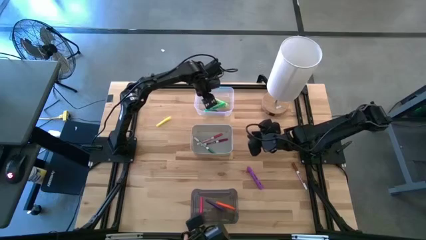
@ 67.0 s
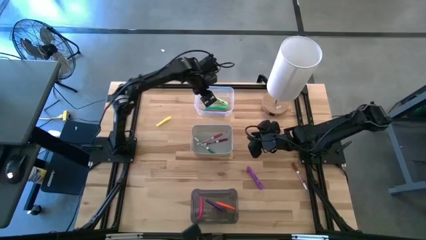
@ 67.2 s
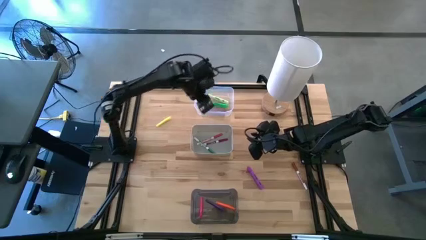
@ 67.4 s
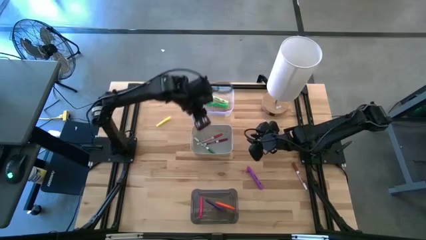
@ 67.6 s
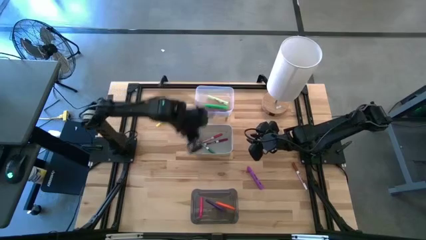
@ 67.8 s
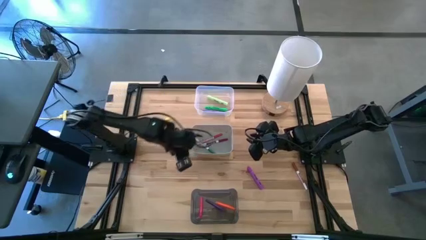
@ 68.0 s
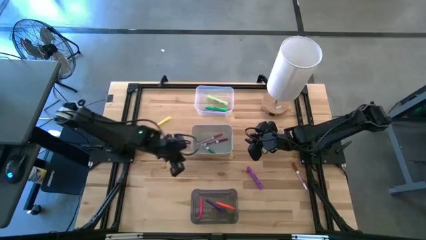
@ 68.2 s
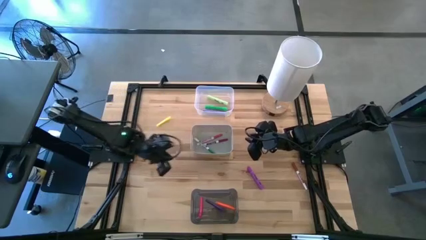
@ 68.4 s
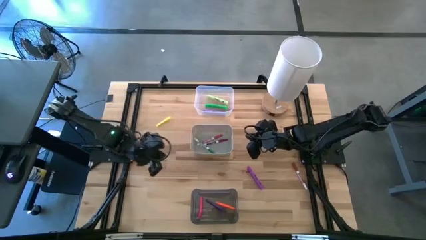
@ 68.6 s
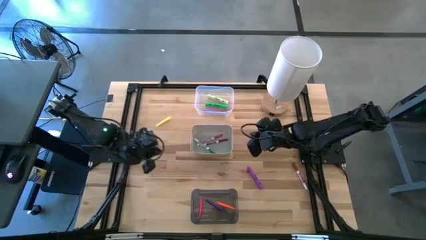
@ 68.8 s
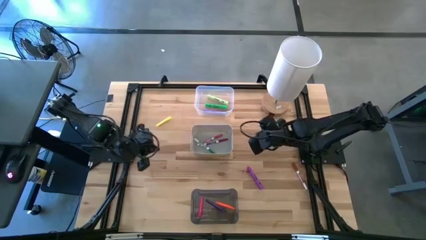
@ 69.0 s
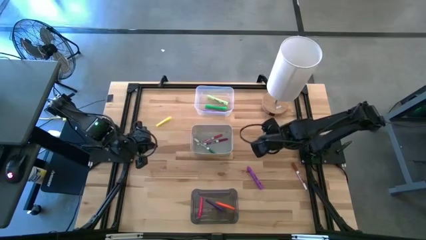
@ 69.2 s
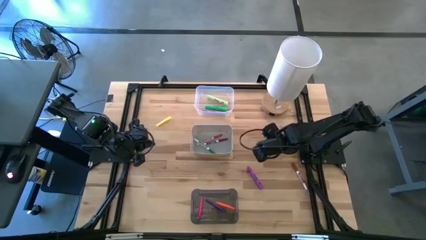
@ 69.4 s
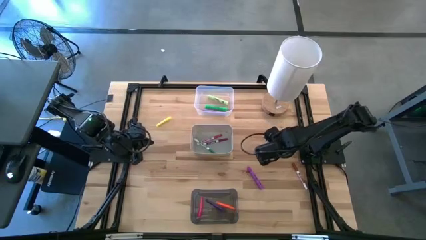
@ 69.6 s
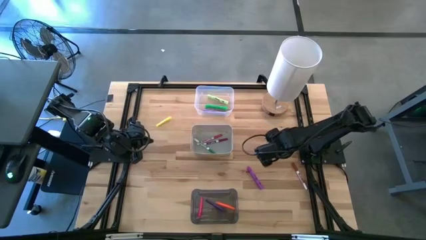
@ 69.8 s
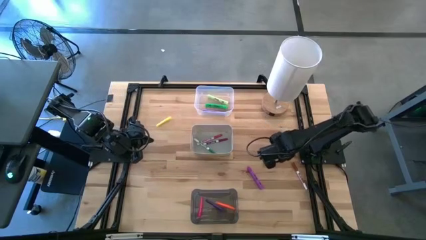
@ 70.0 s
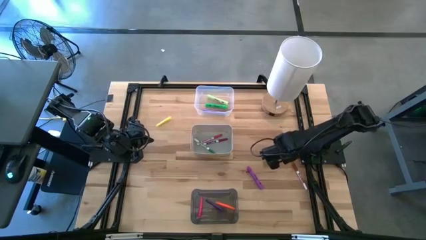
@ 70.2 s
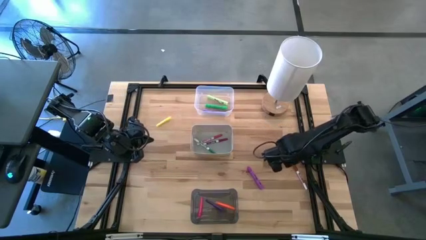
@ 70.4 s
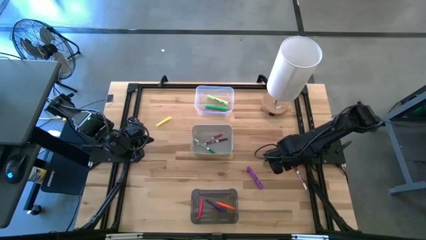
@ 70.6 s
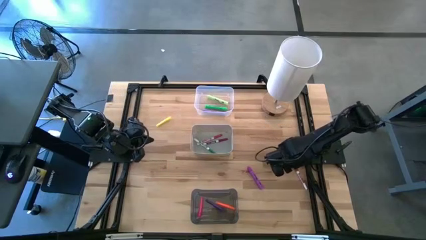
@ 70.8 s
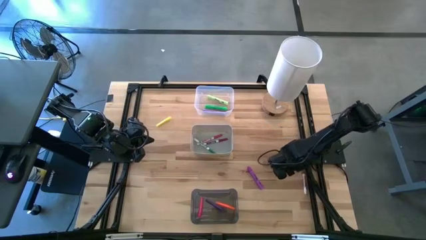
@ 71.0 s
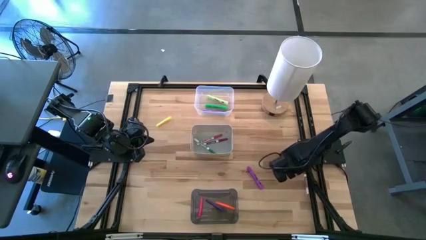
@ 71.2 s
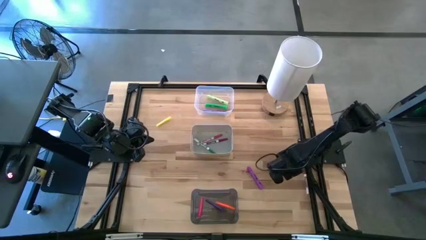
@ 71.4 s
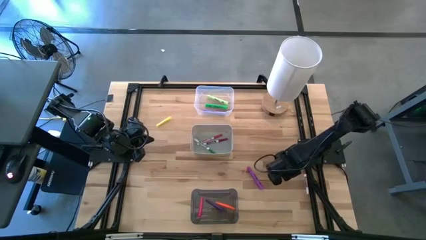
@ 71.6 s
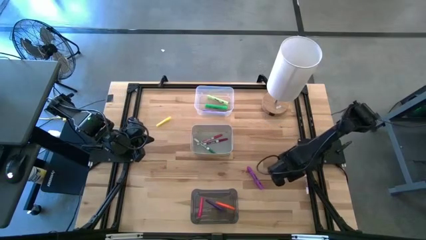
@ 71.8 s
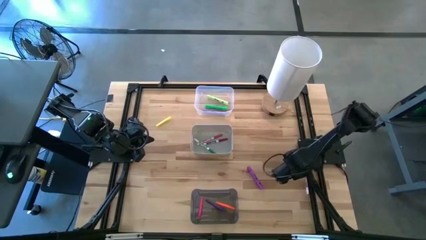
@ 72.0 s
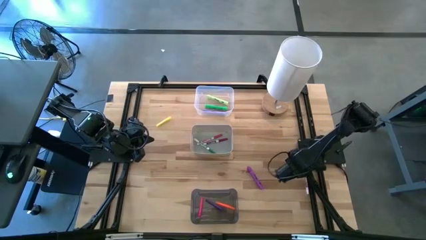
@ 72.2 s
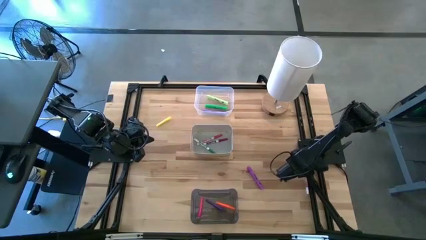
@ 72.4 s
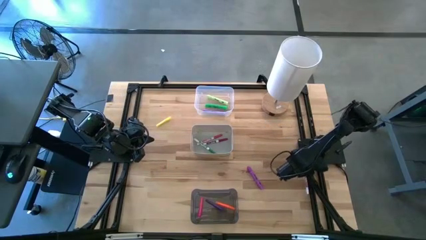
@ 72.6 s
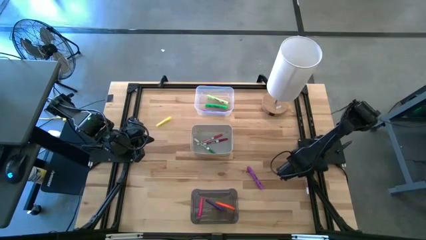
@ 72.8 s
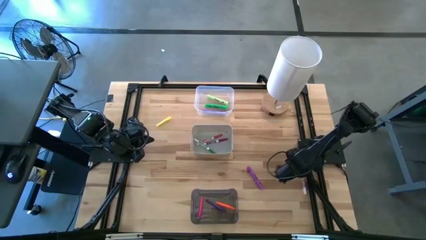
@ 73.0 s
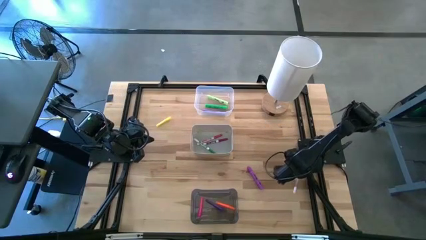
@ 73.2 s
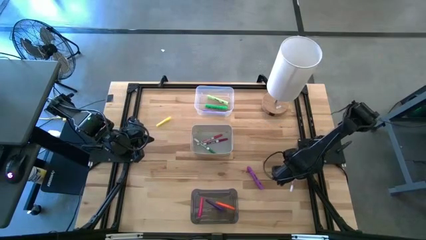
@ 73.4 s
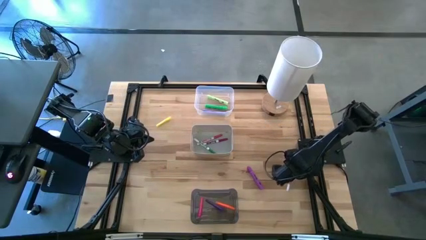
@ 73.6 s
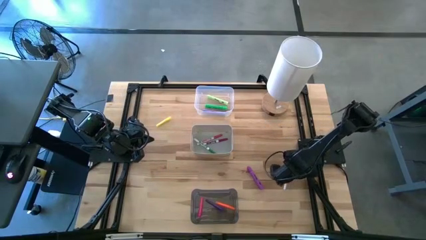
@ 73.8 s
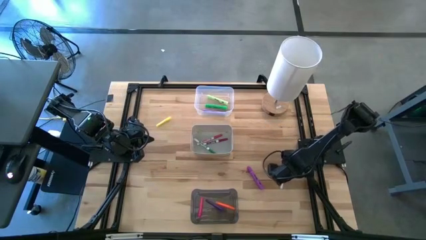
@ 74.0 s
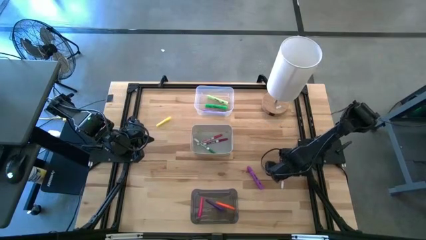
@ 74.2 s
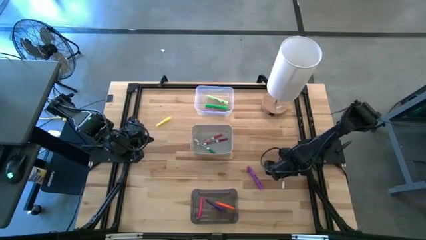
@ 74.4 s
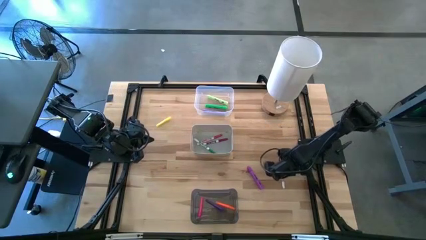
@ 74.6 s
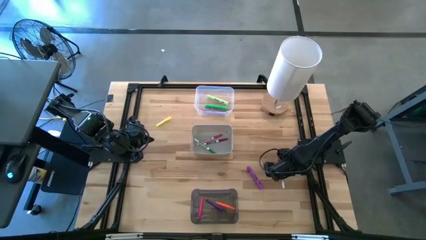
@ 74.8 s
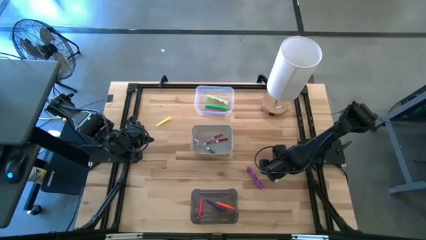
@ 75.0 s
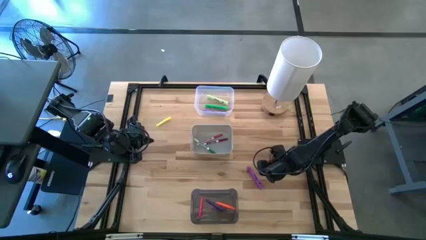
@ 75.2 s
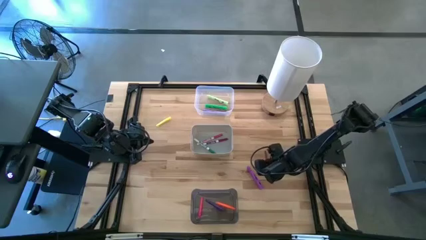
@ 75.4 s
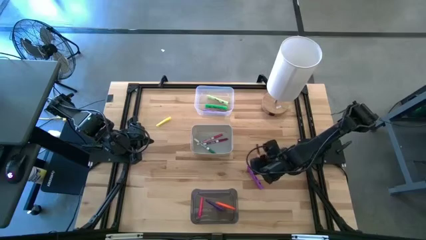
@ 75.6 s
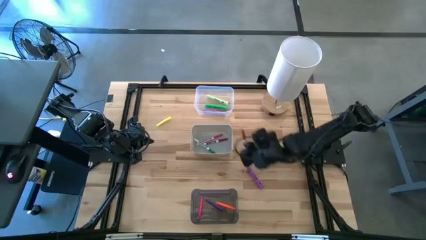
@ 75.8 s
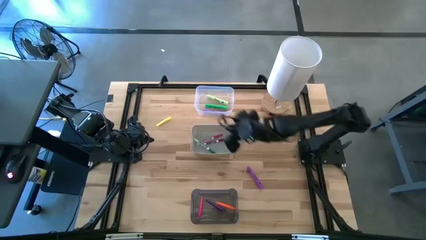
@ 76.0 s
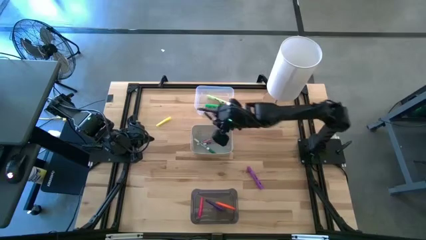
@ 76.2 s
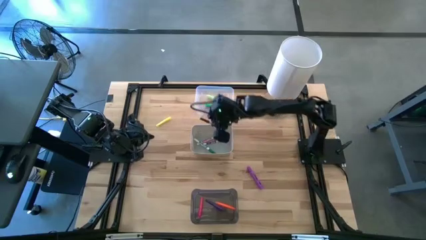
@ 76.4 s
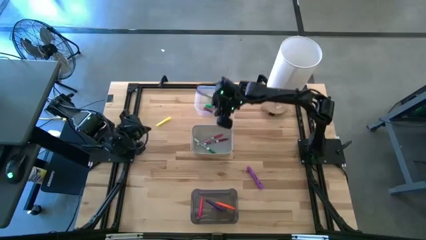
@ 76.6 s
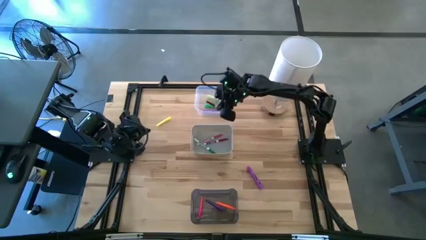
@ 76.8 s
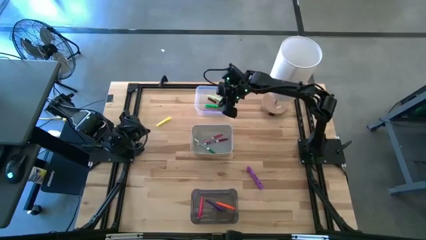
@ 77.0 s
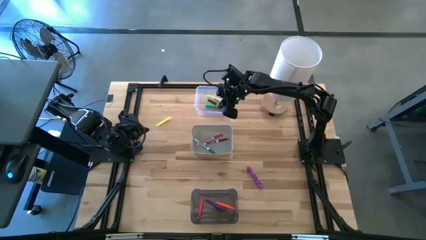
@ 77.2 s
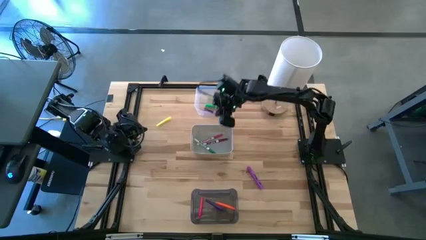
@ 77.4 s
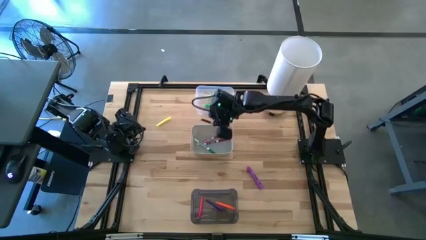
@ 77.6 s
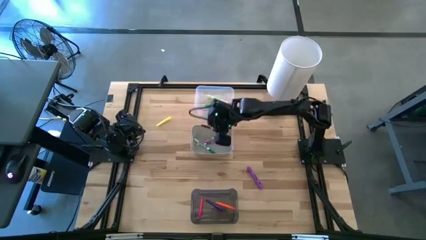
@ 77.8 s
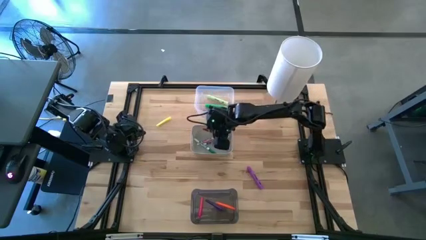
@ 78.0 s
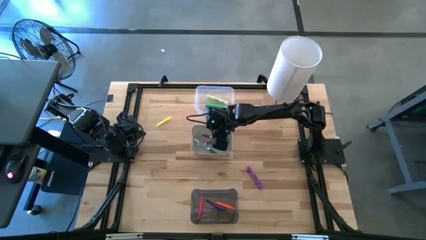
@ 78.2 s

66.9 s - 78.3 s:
Task: Pick & Place Markers
Put the brown marker into the gray bin

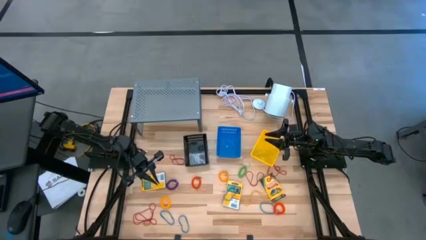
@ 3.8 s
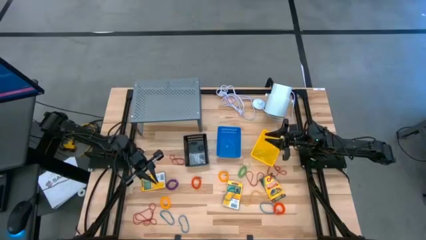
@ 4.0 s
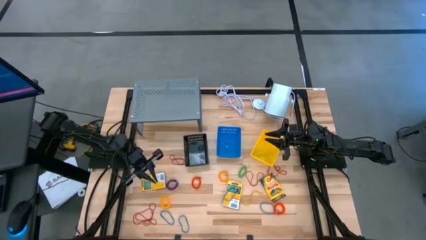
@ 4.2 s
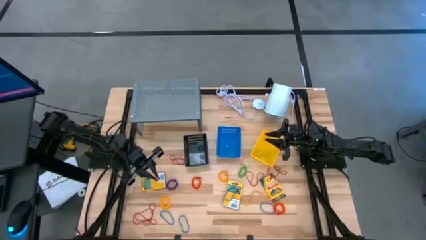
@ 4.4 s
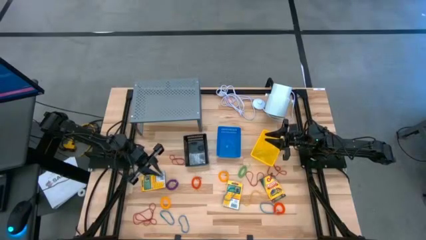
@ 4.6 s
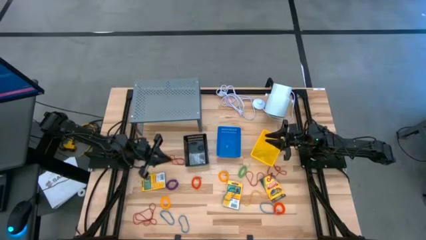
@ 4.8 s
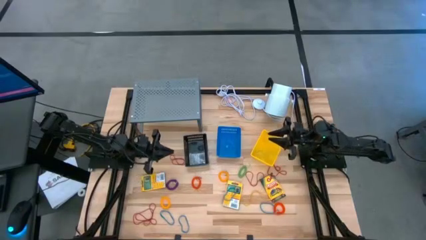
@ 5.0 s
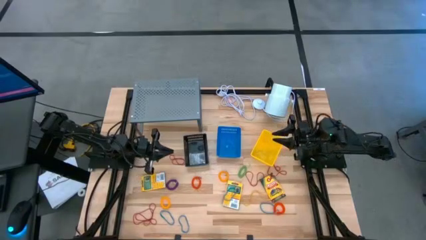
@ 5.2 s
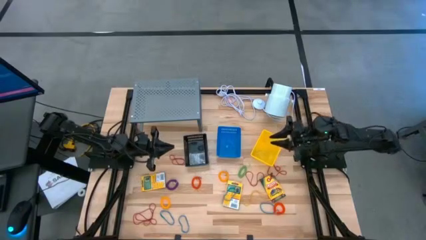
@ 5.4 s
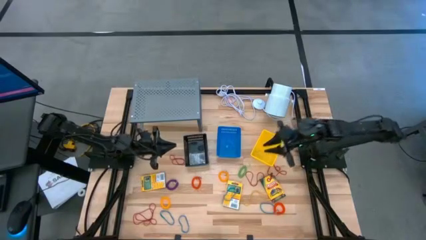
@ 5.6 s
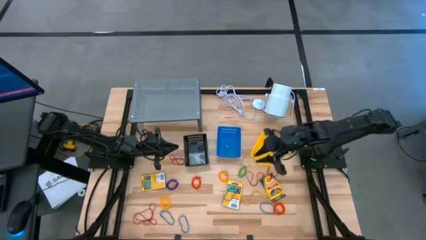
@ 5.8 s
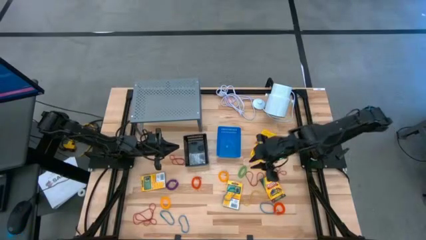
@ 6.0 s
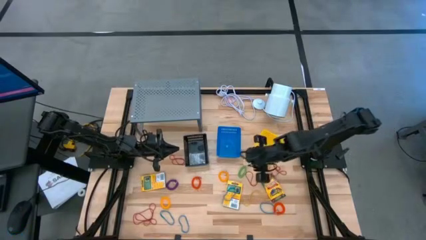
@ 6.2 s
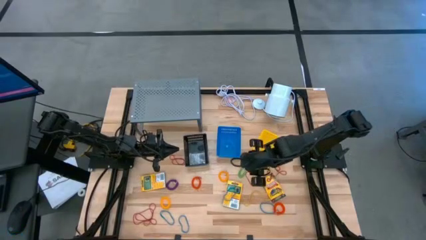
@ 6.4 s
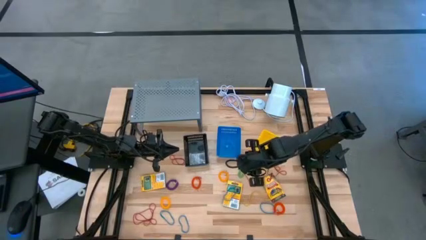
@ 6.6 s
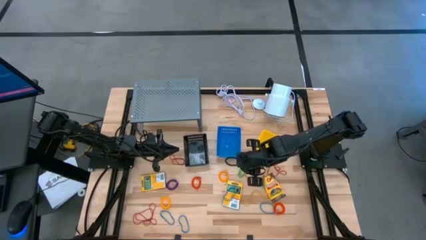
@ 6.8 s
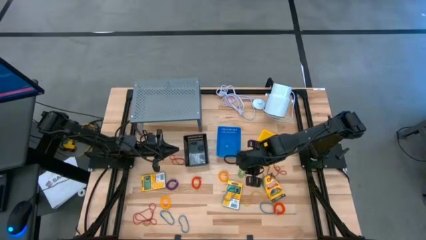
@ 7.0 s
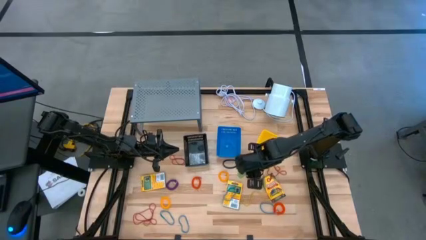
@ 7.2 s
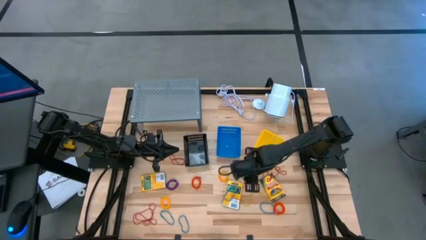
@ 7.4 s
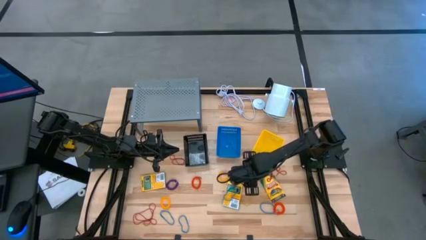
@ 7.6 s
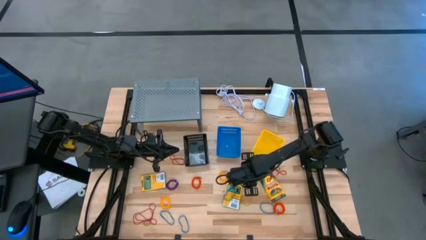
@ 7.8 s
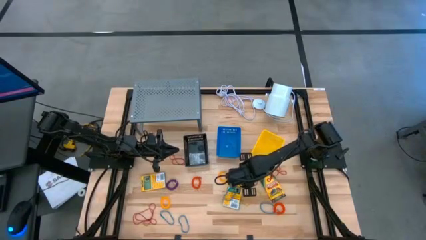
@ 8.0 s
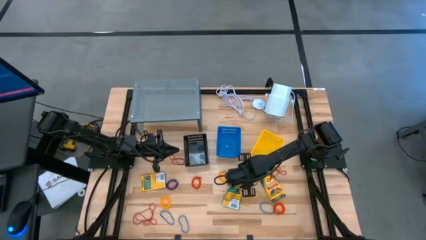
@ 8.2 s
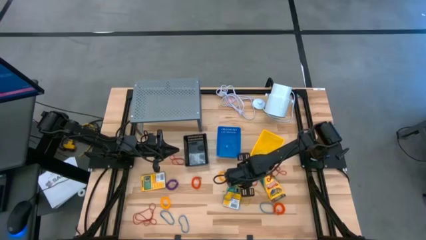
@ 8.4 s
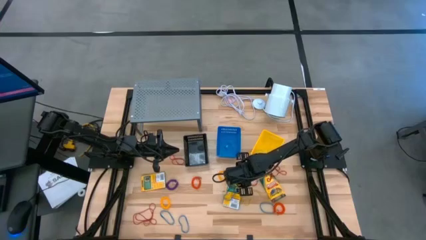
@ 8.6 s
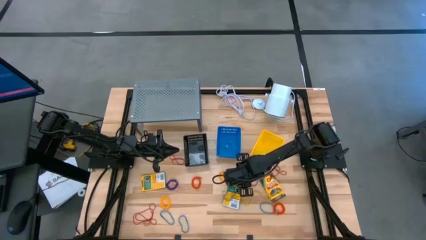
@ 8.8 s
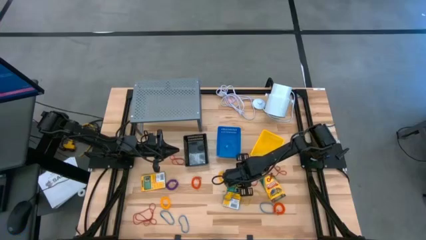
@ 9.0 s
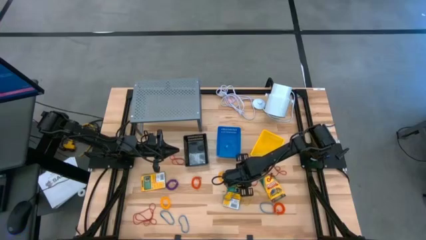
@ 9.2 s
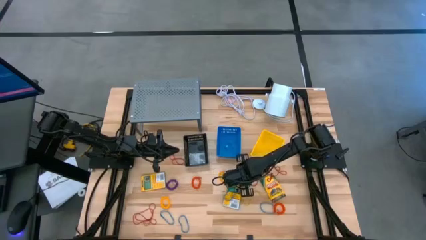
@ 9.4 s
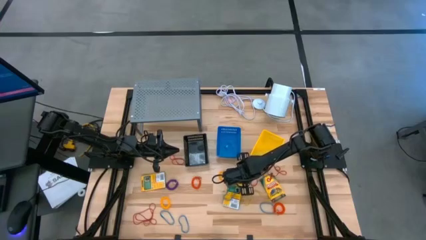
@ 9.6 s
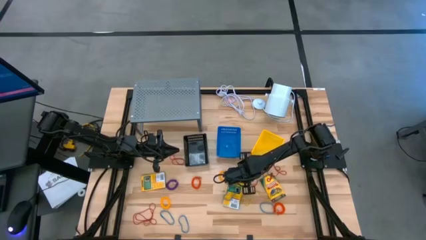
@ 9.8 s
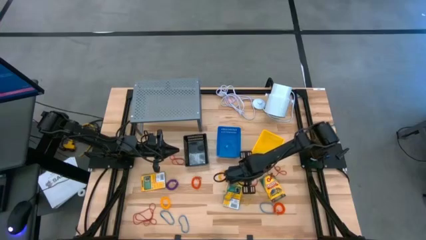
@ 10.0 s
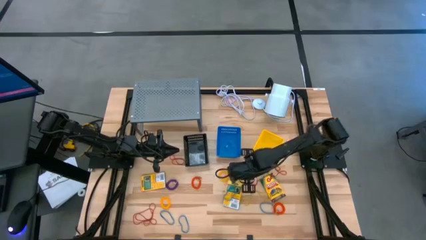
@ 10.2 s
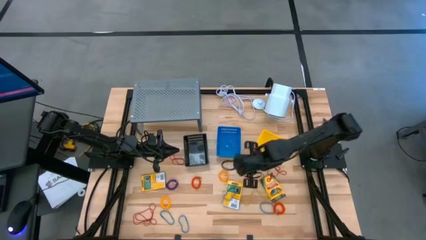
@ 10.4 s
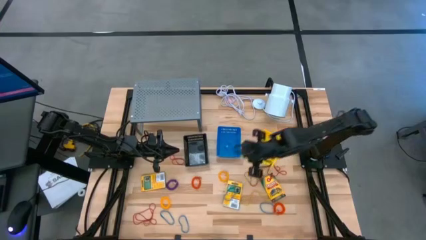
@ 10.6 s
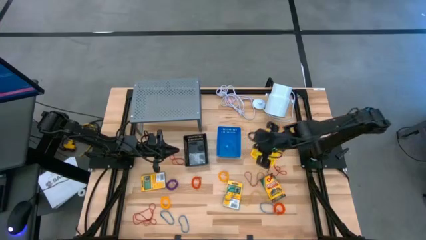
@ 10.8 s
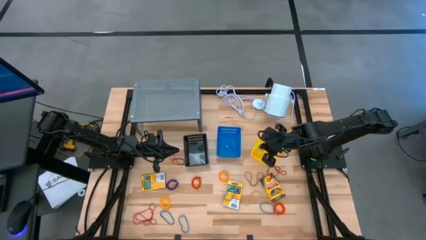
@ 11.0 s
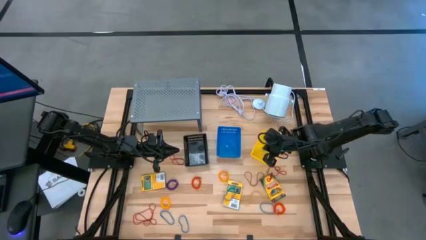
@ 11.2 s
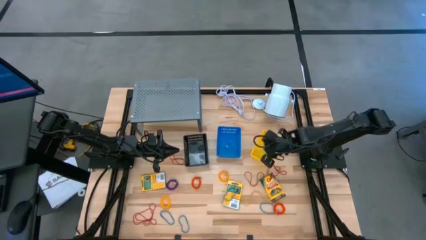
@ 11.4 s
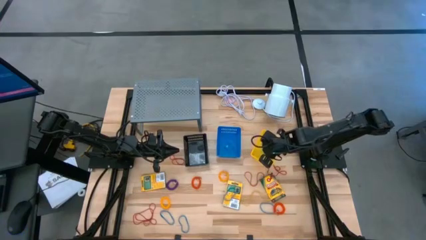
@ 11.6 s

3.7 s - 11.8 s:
Task: Pick & Place Office Desk Supplies
Put the green stretchable key holder into the yellow basket
